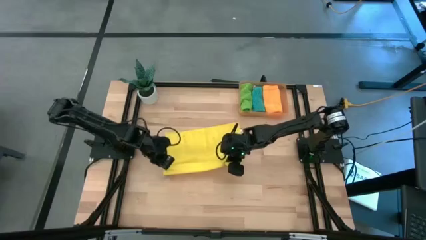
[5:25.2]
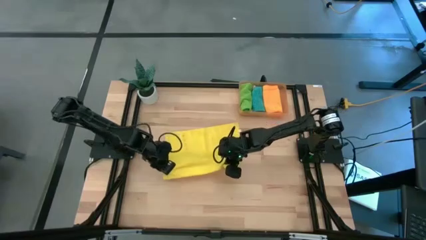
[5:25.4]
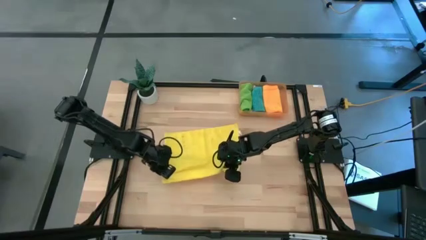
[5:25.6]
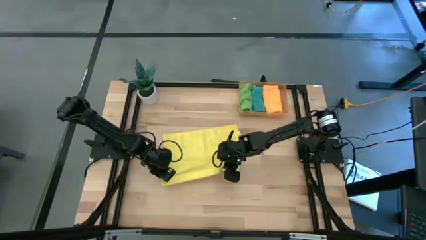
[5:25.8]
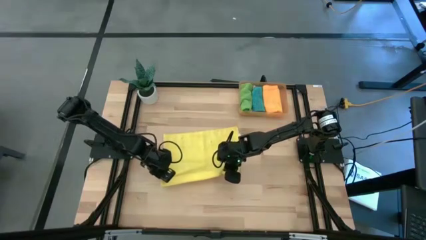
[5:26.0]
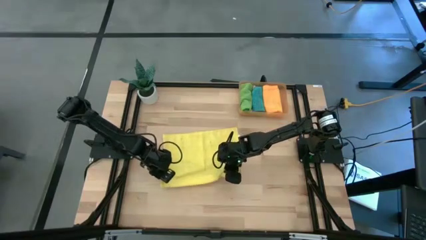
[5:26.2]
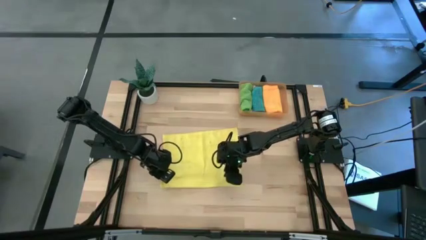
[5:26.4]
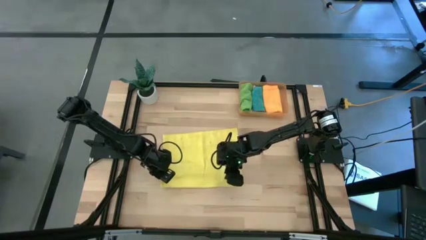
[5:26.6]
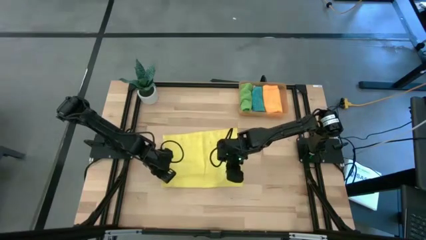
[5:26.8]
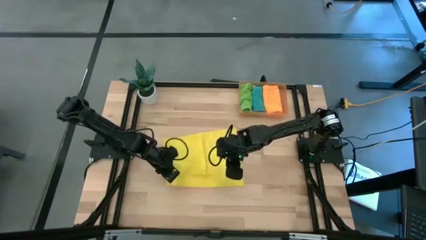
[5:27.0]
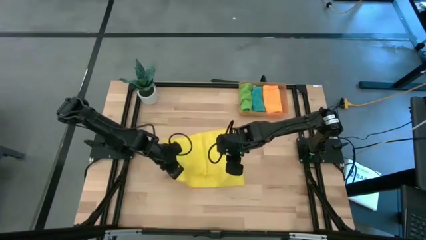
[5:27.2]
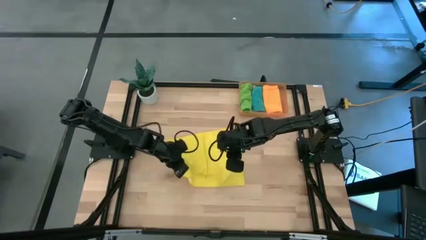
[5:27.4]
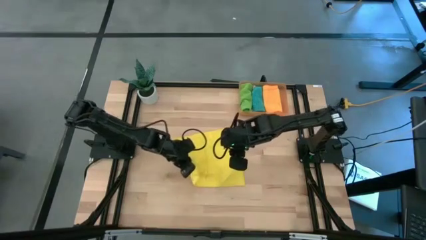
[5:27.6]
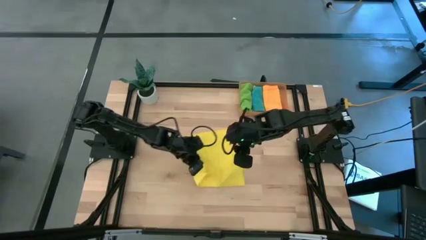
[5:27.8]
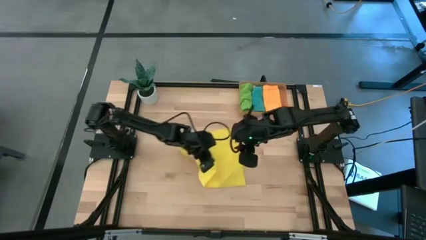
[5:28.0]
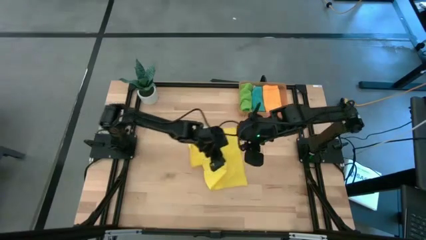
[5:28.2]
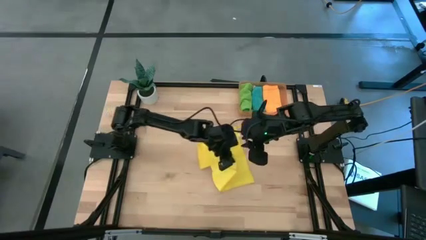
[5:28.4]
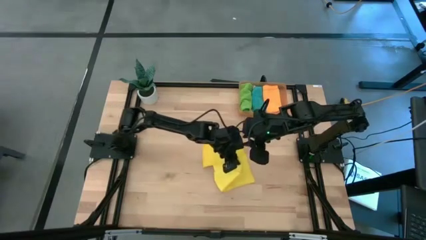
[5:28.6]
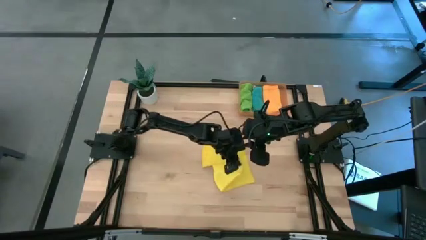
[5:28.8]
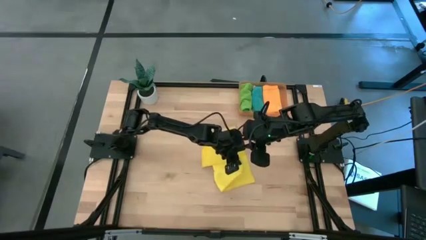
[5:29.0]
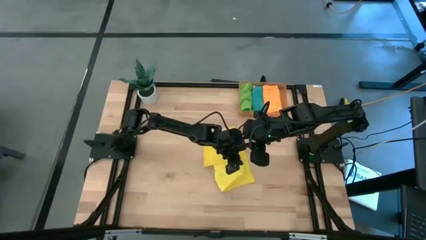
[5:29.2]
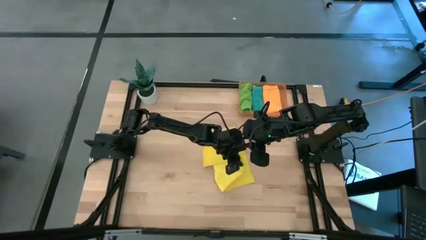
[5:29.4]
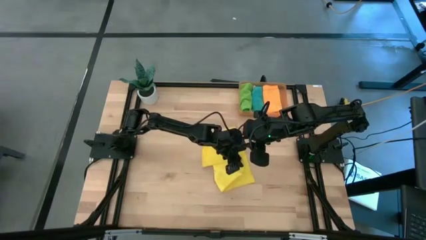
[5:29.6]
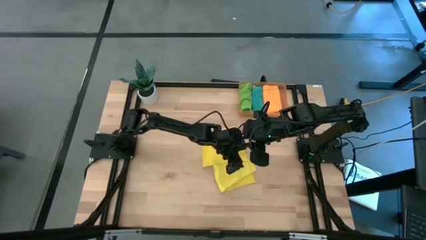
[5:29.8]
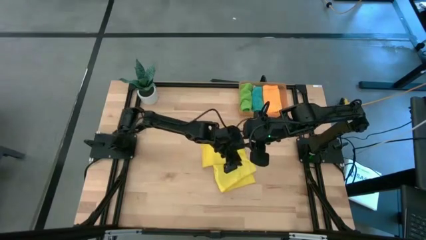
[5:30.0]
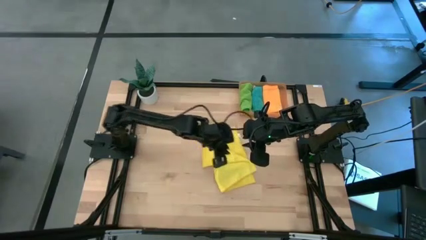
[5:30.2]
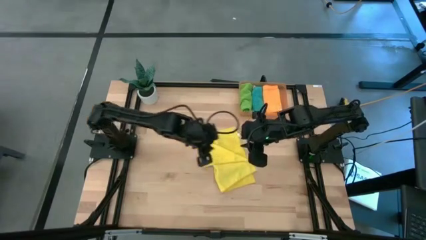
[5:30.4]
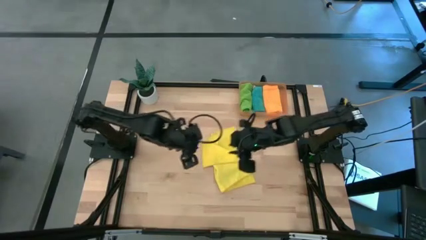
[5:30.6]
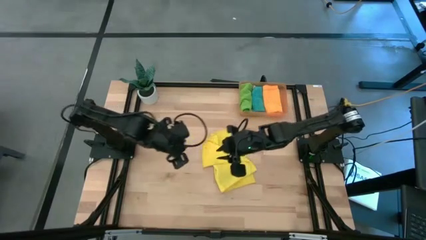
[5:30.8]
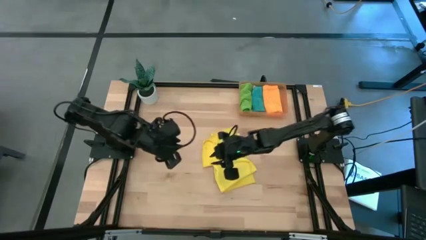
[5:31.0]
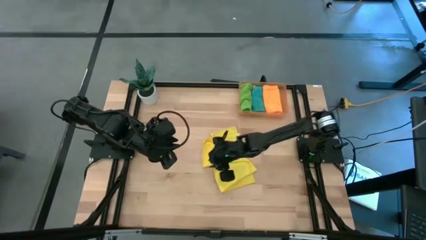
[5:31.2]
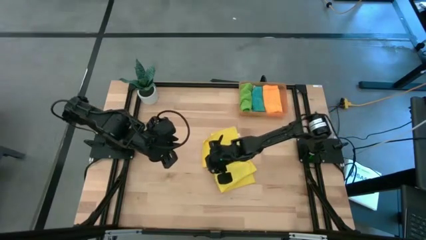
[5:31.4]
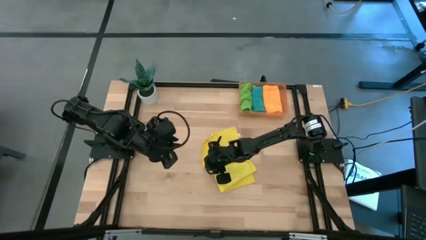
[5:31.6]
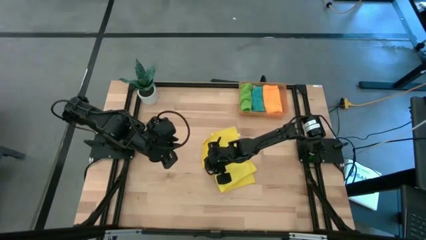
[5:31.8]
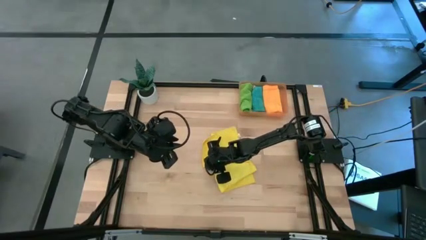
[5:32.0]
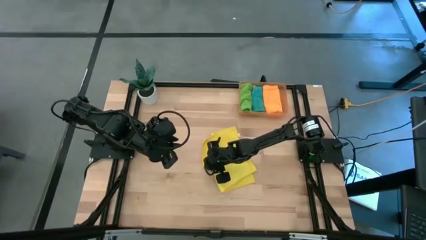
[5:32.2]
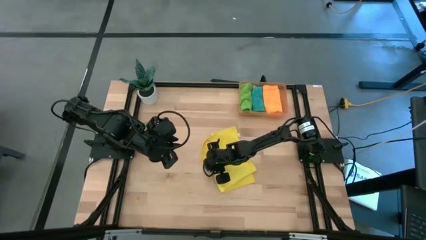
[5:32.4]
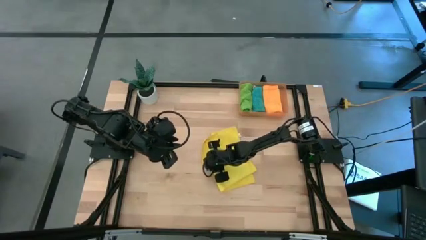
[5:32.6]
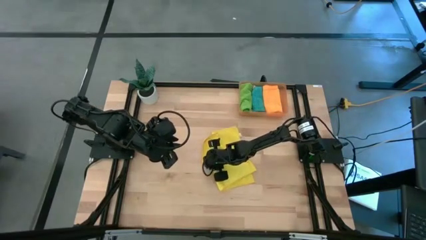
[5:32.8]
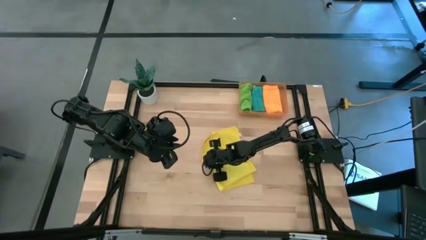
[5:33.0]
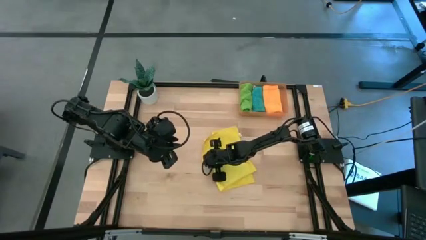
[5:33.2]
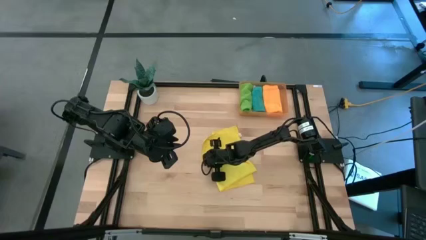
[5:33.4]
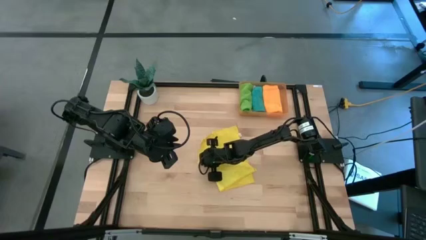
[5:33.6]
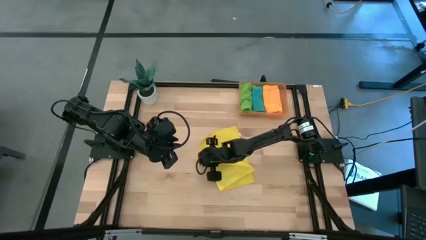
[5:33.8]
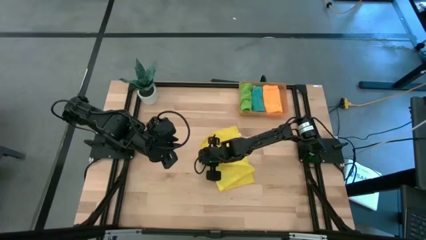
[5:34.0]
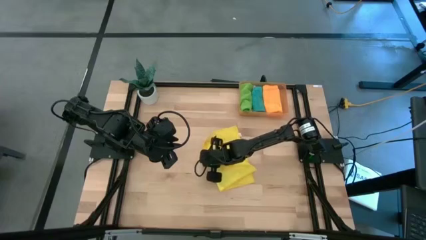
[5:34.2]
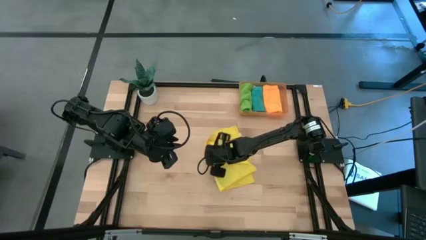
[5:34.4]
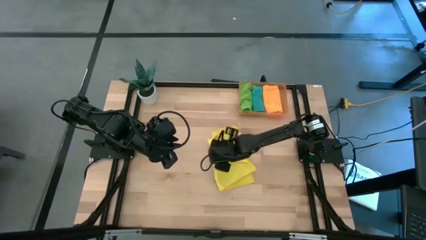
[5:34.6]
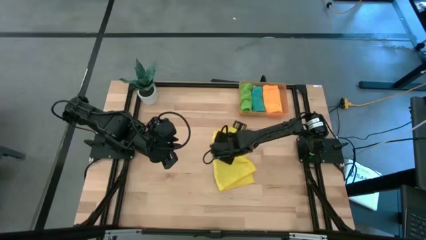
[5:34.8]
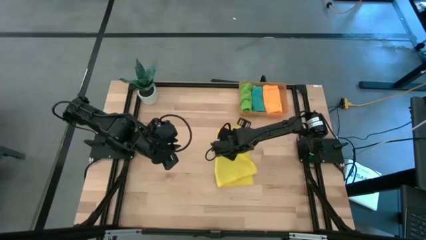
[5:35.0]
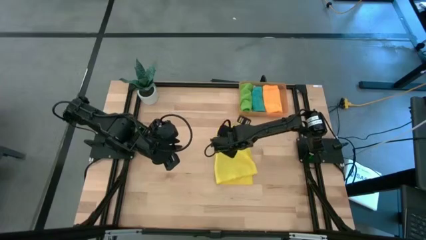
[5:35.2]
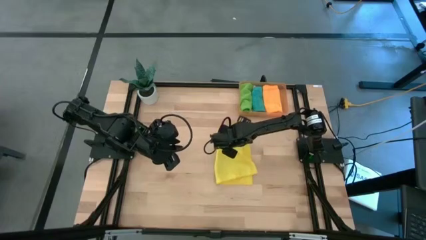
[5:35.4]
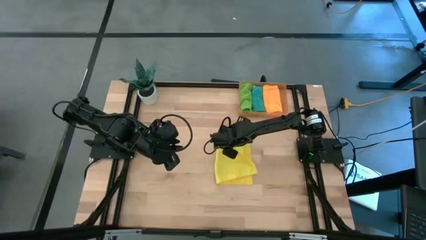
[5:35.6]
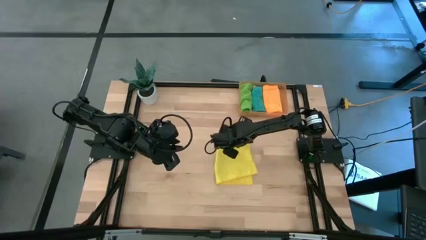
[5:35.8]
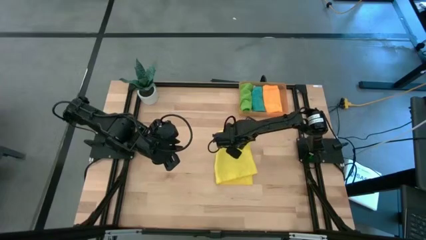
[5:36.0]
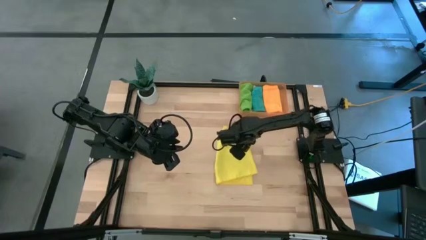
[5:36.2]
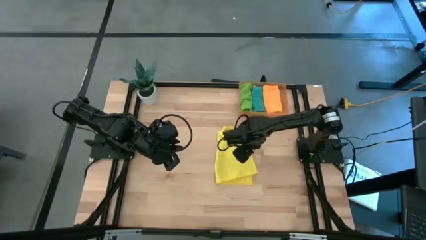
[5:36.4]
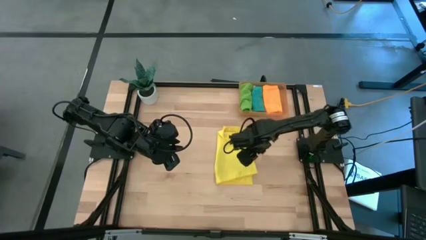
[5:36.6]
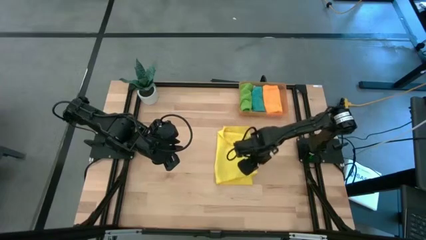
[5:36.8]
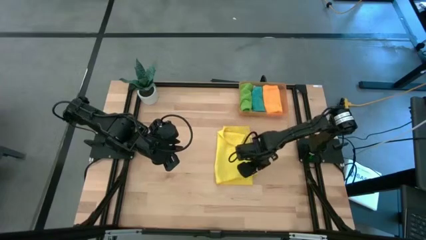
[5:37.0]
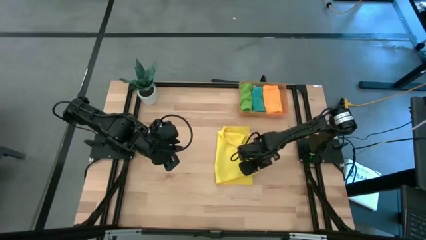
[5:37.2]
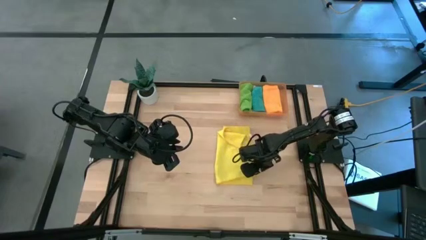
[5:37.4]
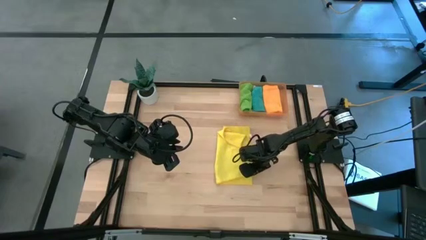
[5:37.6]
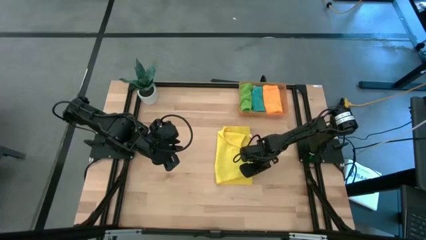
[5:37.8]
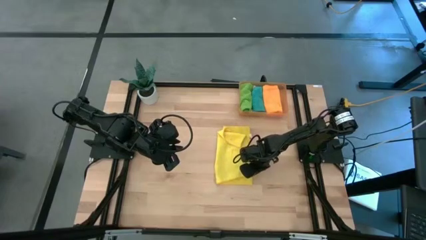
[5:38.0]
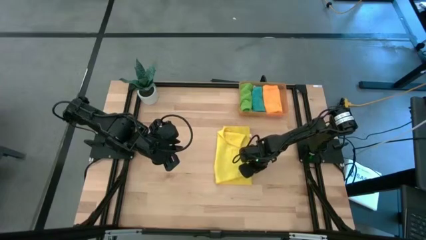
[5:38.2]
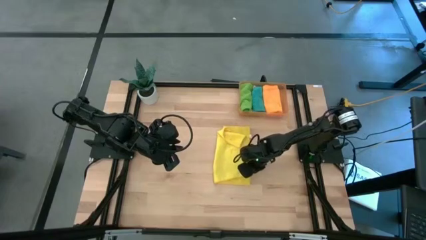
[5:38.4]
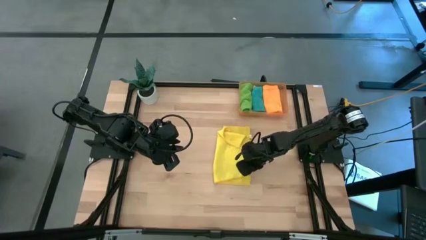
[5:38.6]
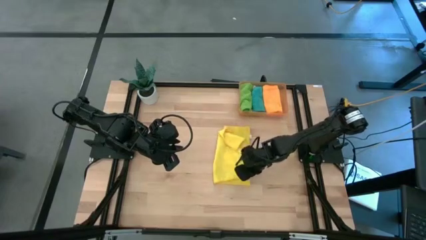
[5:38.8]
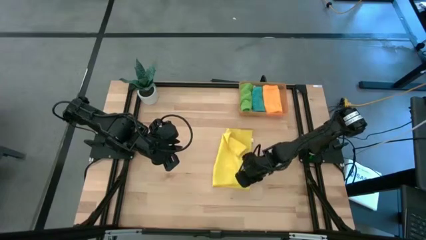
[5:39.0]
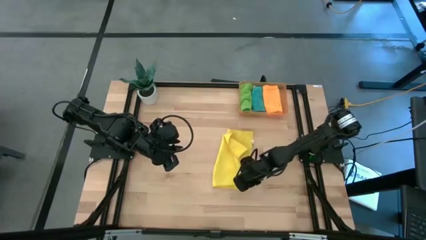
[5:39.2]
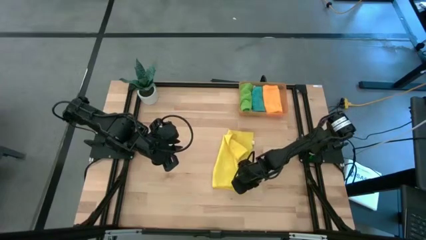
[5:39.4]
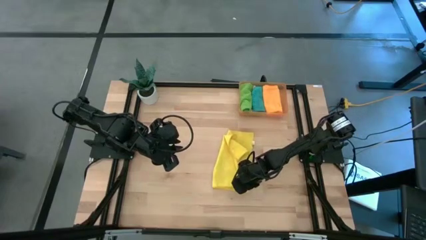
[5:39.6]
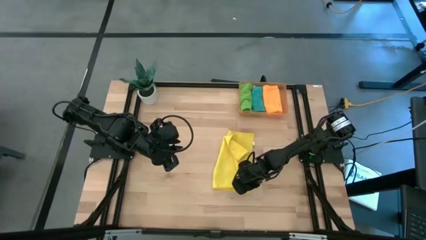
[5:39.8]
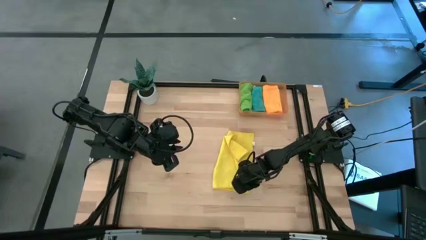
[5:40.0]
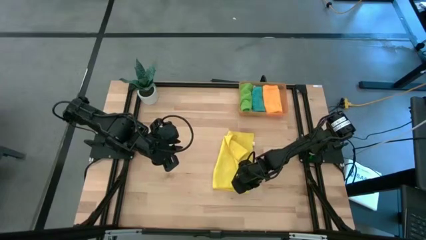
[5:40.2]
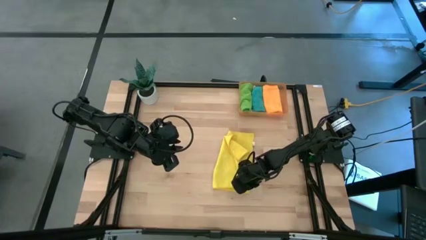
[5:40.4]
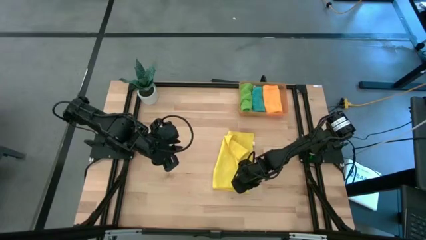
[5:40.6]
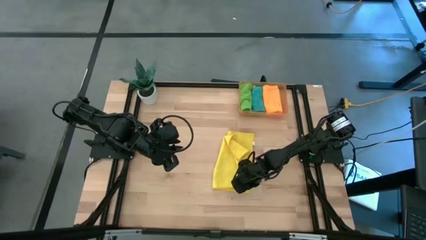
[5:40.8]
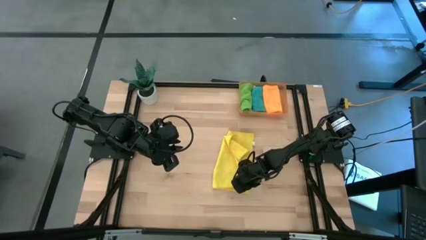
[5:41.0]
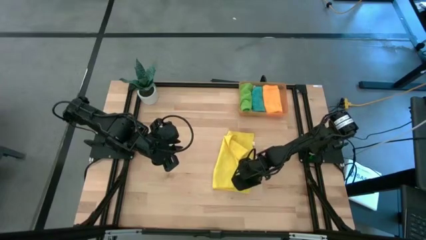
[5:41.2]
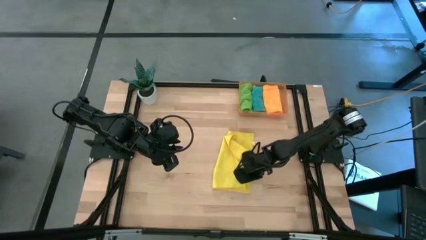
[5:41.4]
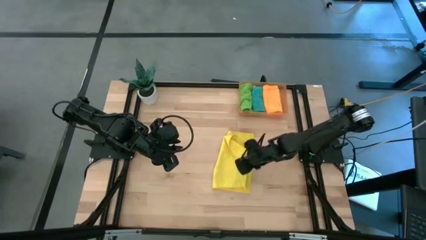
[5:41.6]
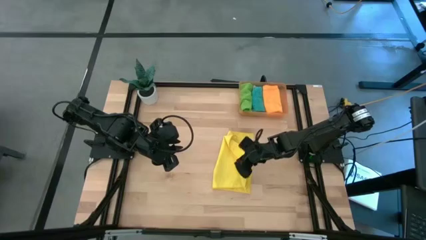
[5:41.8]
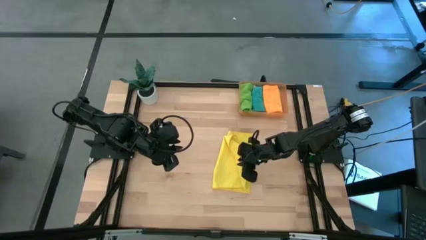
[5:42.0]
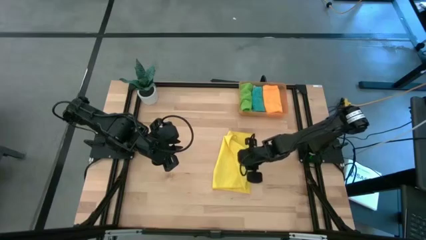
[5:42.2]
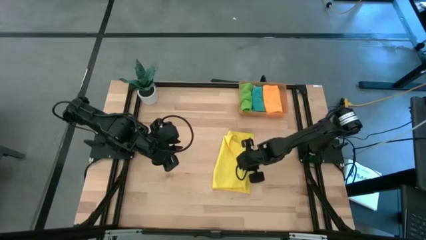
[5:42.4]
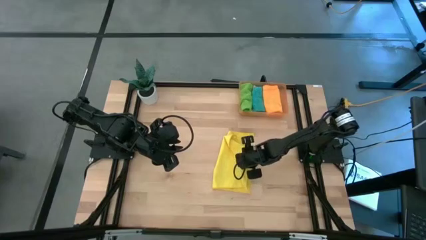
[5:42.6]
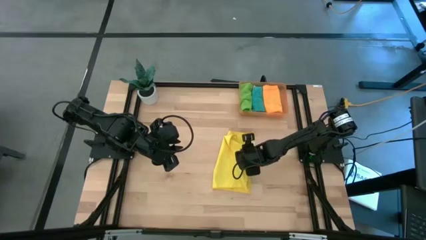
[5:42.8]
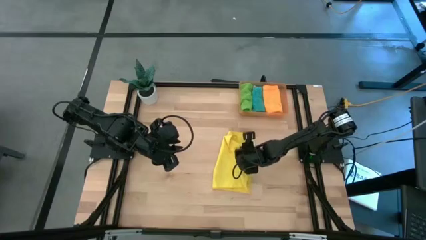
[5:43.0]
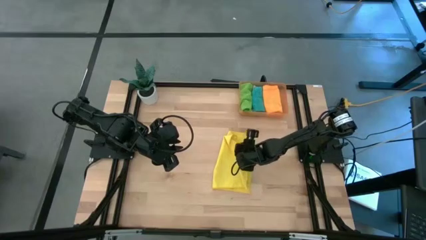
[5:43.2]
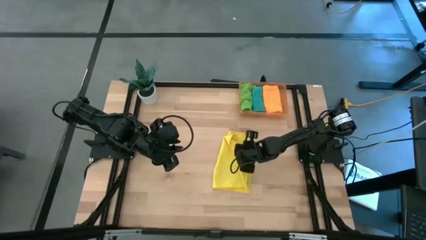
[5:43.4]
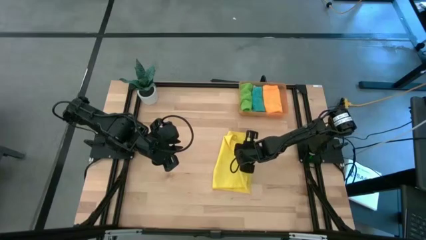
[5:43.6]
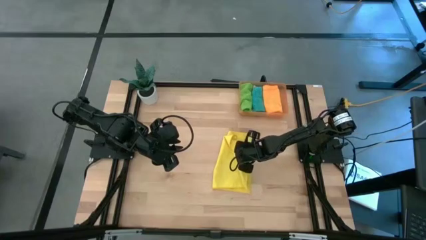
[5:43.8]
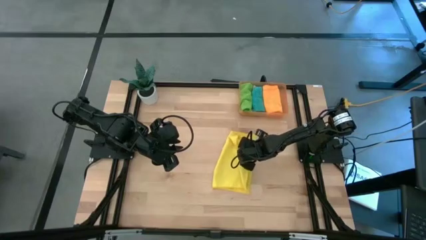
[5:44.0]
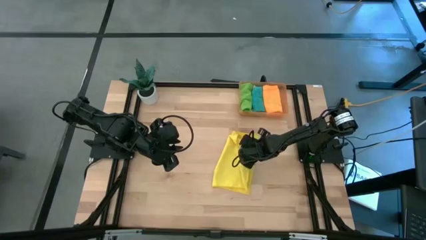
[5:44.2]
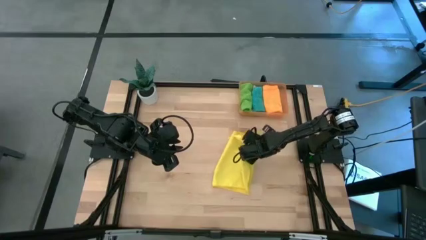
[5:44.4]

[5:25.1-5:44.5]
Task: Roll microfiber towels into tight, uniform cylinder then place into a basket
Fold the yellow towel
